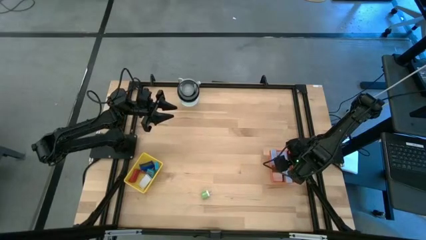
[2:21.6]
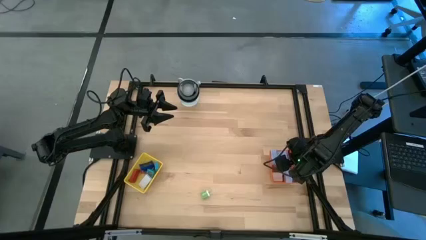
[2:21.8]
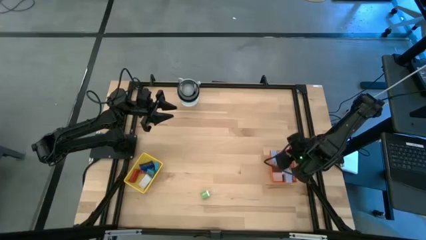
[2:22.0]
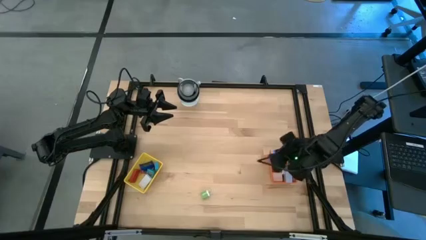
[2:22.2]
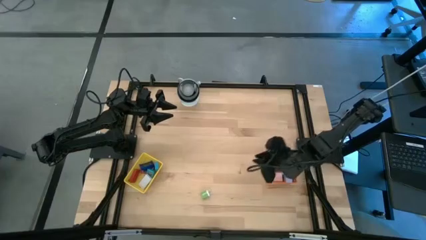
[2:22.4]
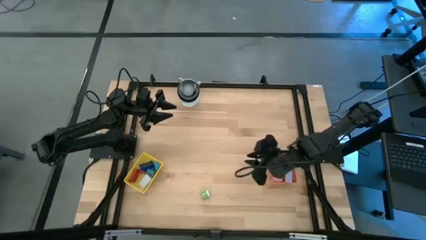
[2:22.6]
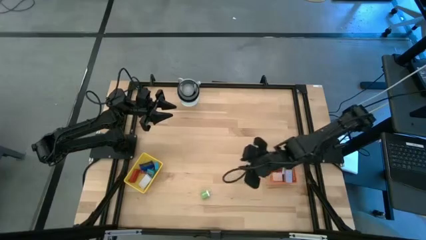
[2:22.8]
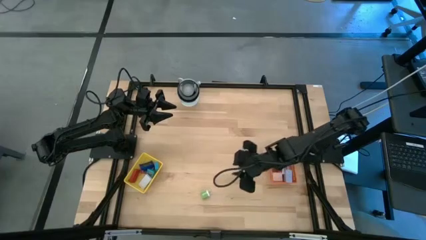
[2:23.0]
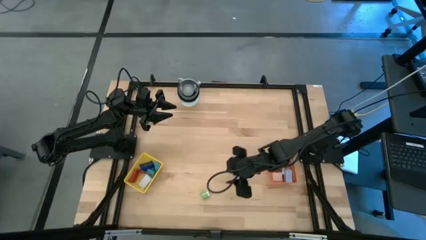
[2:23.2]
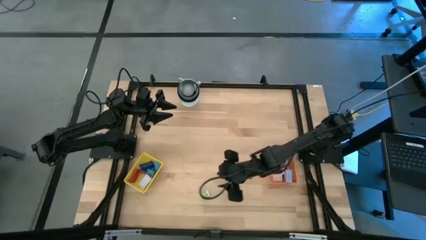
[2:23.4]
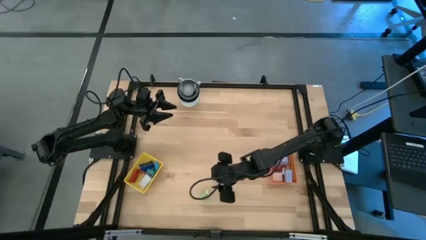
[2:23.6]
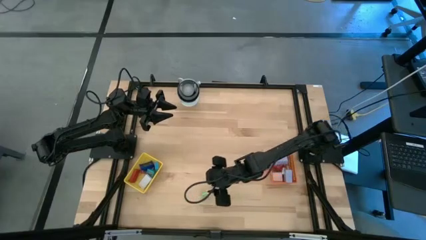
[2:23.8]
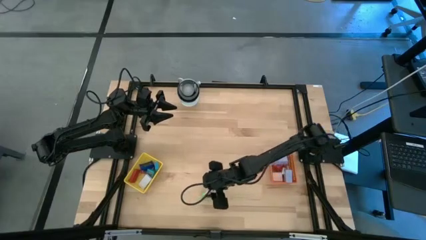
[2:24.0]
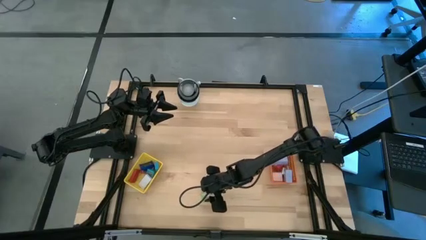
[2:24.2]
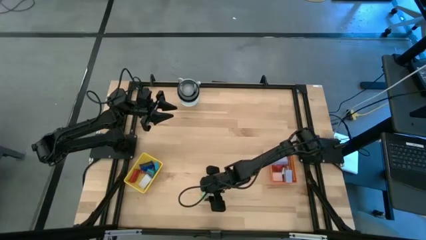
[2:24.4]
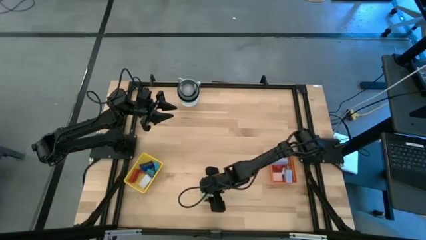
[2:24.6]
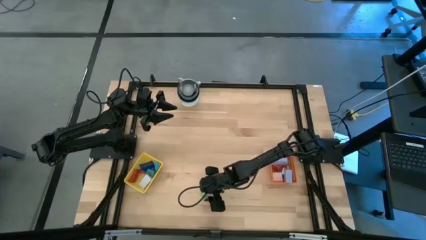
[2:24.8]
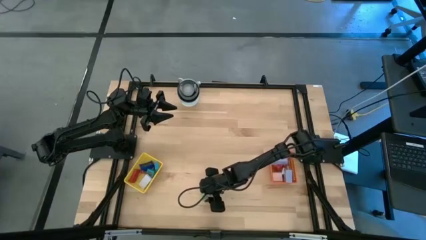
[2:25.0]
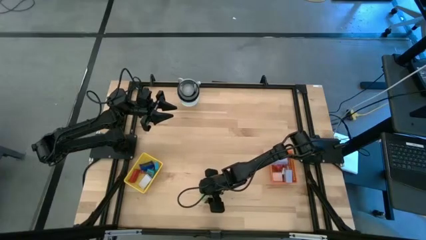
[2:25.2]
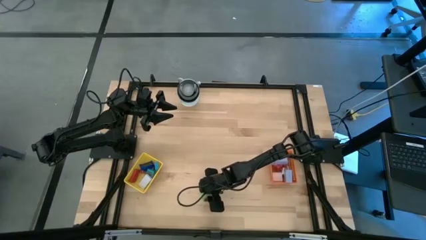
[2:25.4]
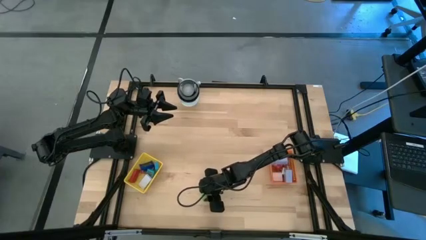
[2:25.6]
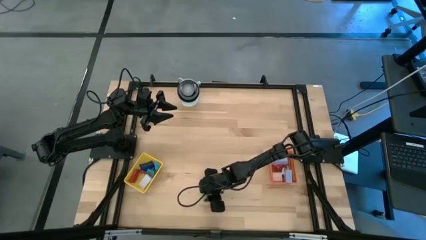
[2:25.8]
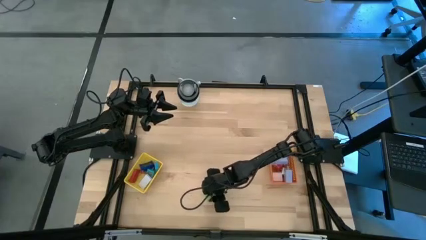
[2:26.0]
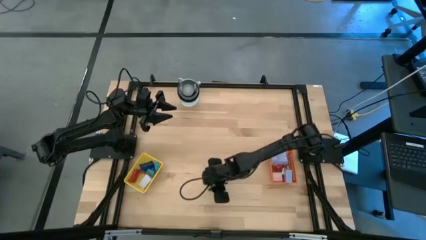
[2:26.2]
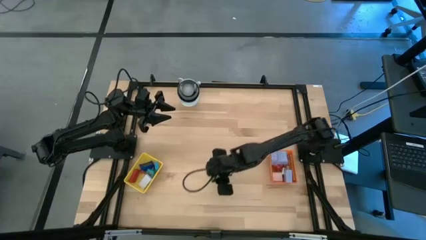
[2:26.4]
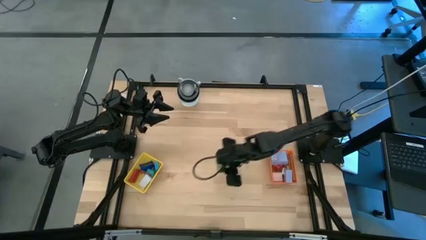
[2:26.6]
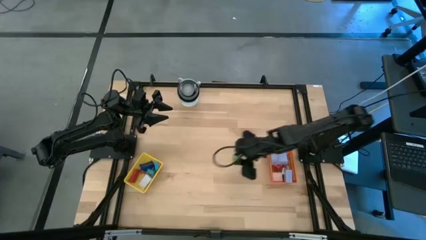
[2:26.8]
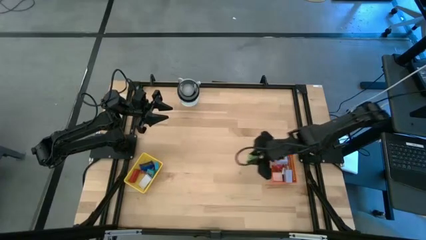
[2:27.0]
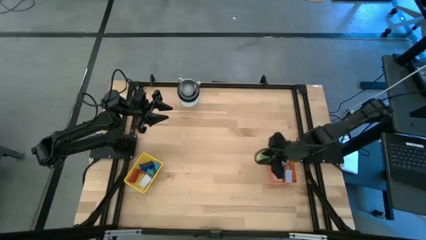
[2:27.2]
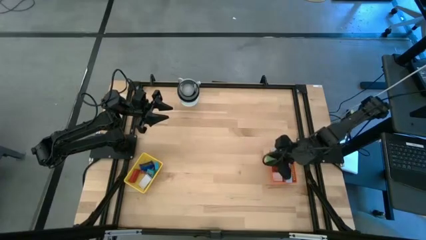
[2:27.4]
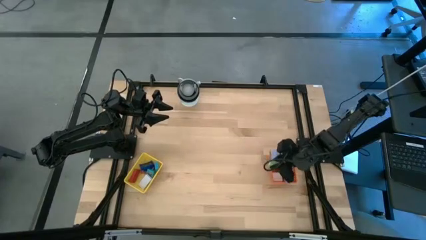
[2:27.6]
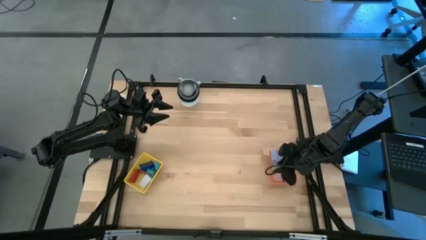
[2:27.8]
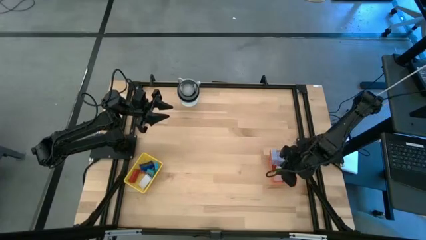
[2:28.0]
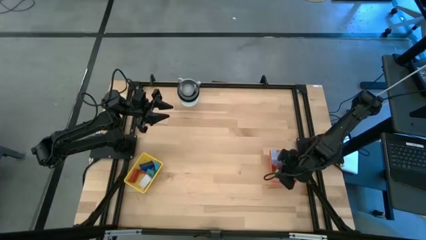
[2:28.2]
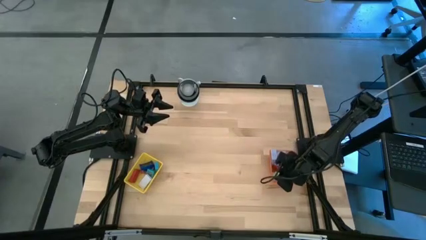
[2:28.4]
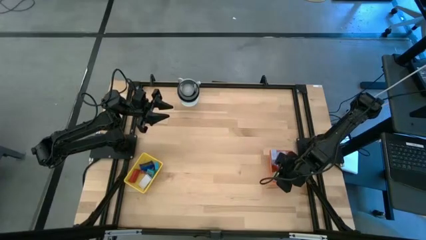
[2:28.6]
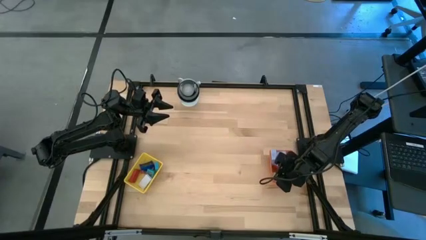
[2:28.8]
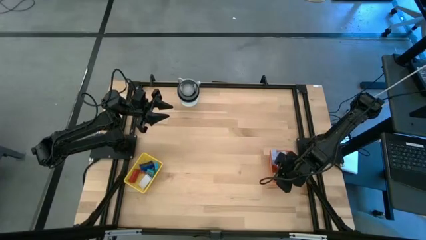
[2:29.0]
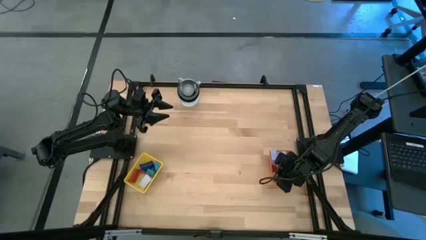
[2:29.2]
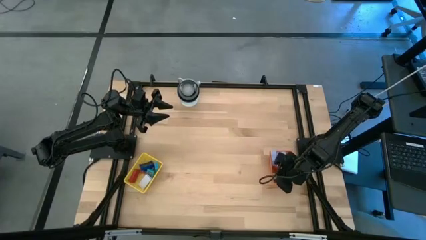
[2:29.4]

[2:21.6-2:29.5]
Task: Pick & Place Office items
Put the green charger adapter into the orange basket

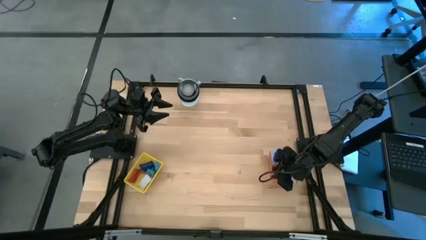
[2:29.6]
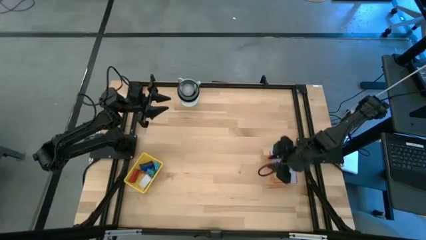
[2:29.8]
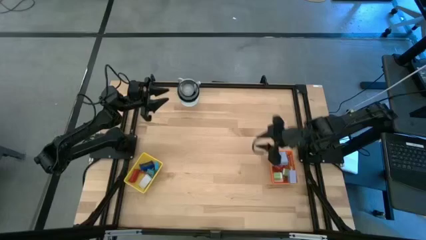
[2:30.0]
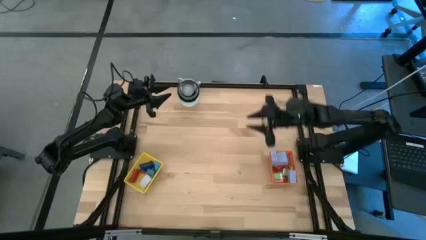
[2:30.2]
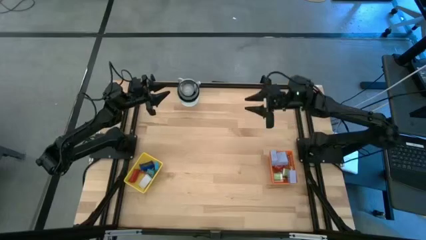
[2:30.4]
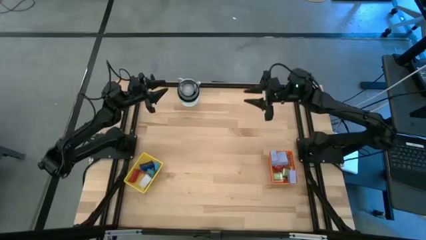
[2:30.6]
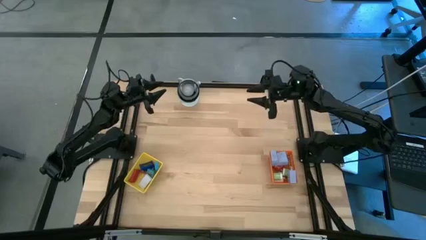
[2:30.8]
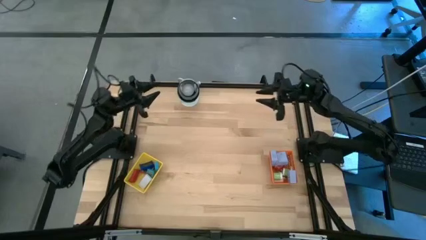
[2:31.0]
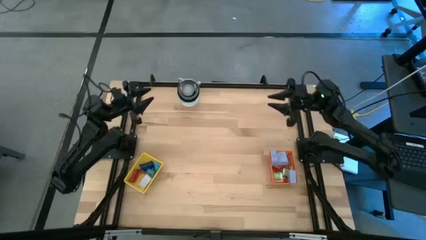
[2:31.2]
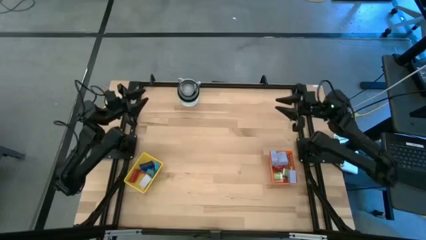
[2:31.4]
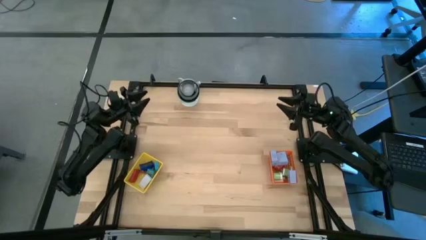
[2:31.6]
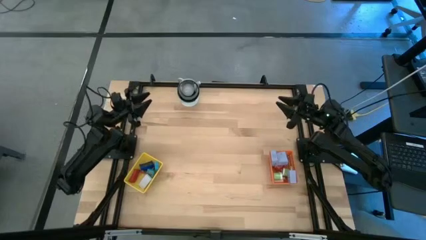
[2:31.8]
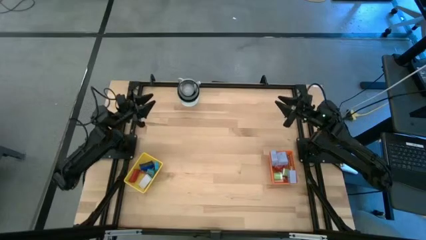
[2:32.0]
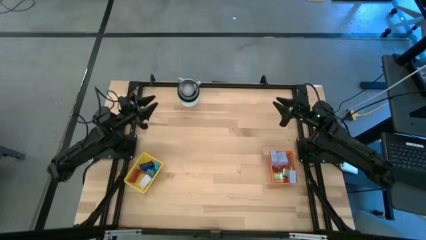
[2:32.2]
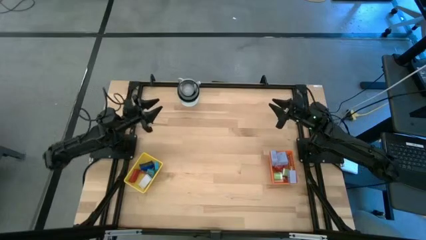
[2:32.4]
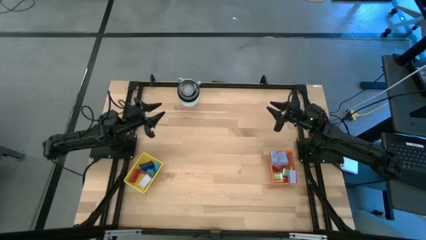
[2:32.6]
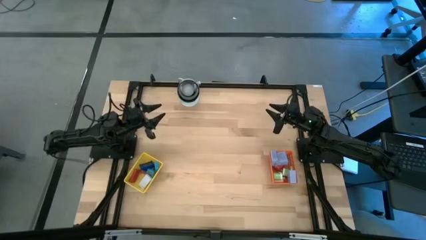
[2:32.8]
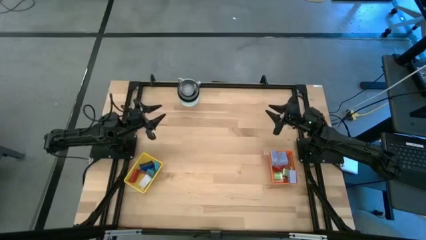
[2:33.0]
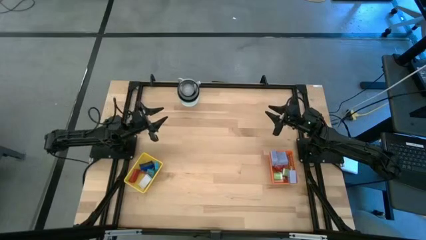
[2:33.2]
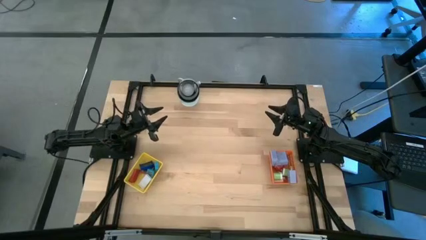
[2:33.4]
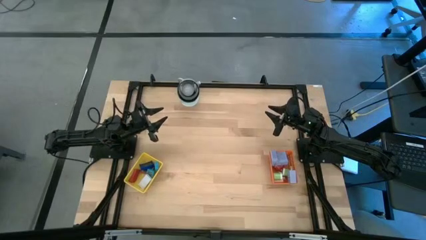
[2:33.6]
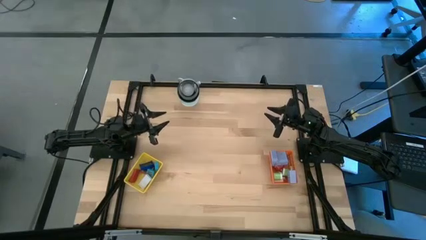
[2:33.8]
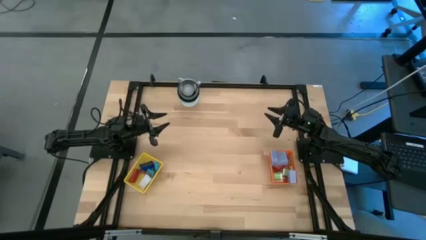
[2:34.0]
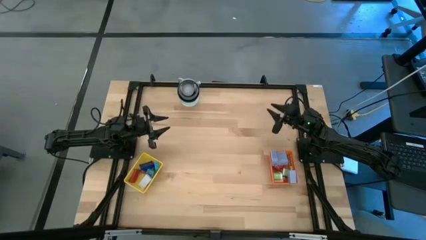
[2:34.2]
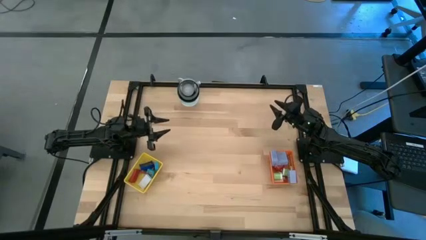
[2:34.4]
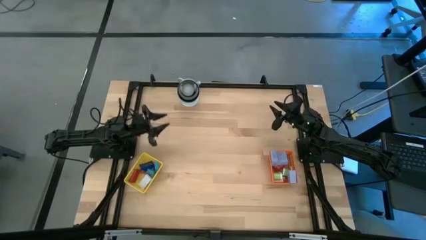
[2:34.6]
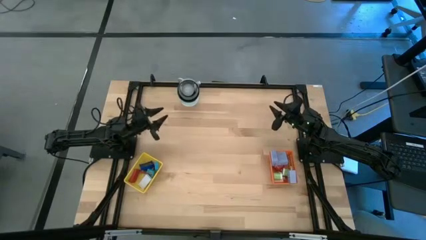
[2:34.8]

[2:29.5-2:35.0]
Return to Home Position

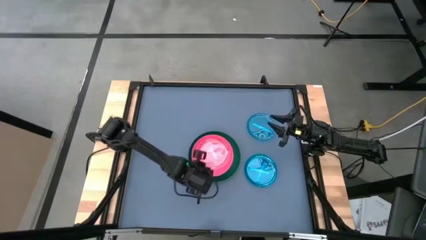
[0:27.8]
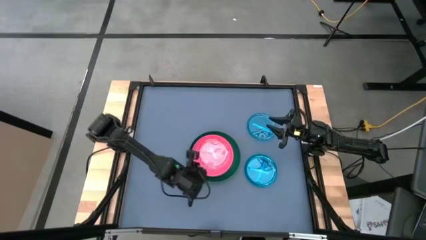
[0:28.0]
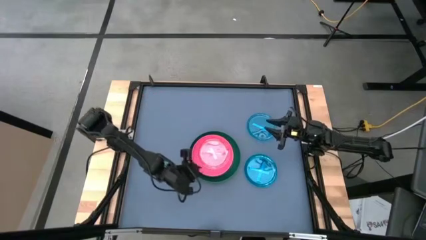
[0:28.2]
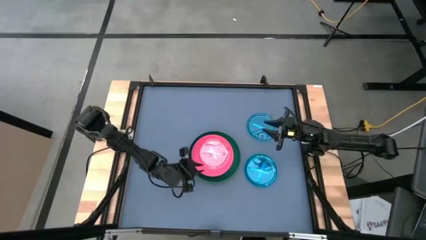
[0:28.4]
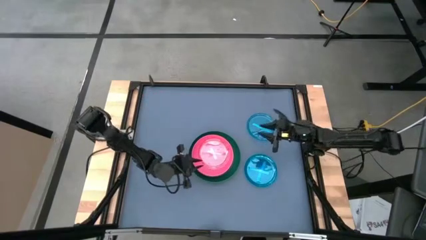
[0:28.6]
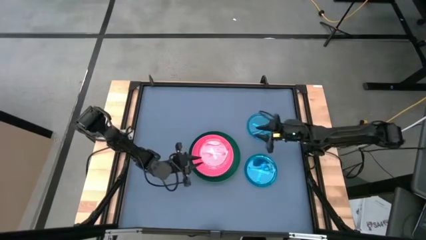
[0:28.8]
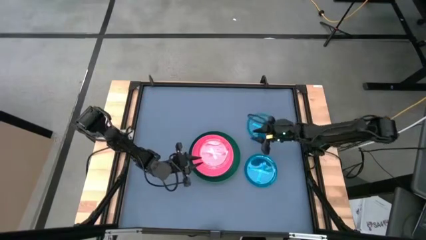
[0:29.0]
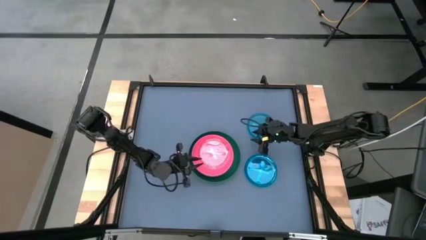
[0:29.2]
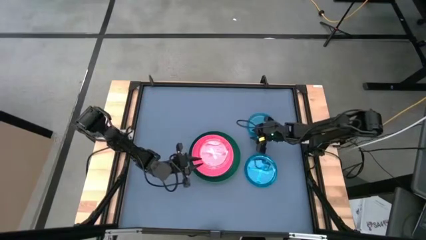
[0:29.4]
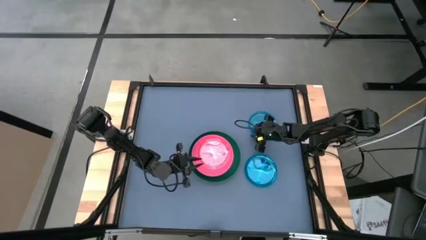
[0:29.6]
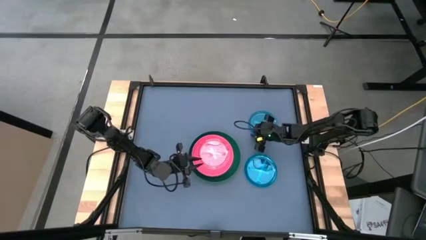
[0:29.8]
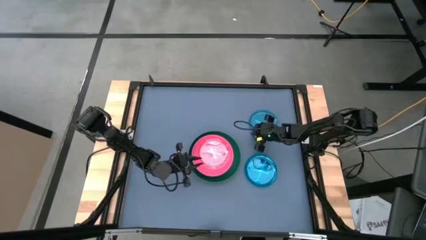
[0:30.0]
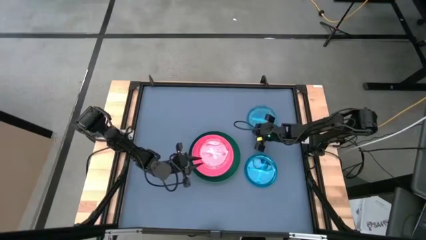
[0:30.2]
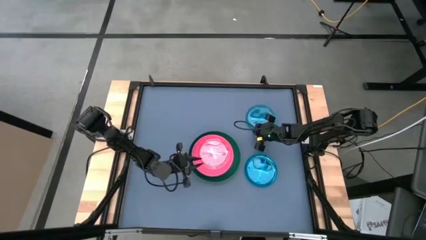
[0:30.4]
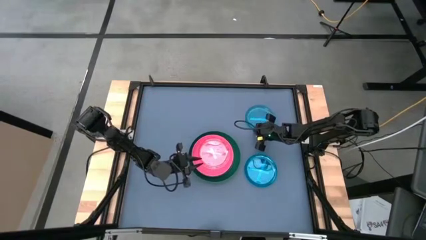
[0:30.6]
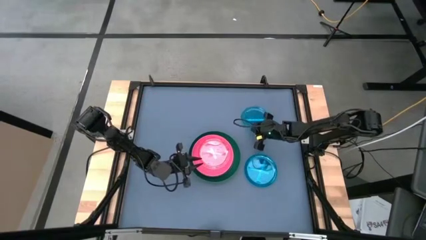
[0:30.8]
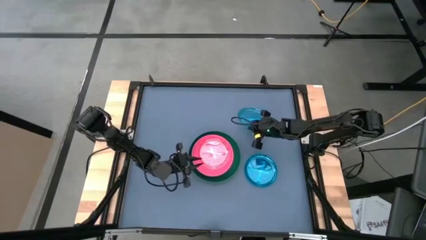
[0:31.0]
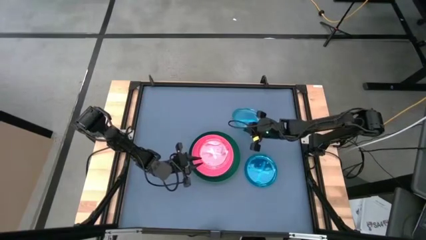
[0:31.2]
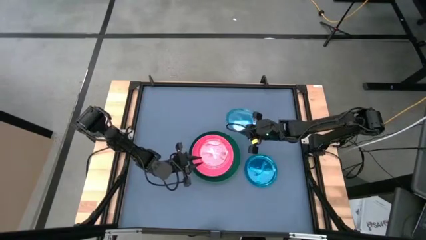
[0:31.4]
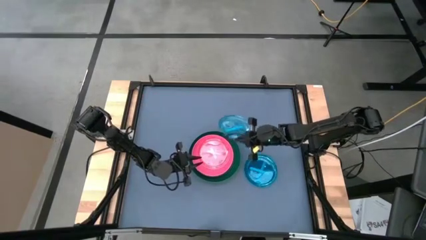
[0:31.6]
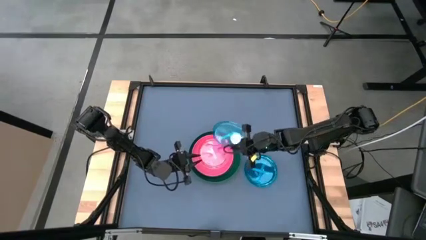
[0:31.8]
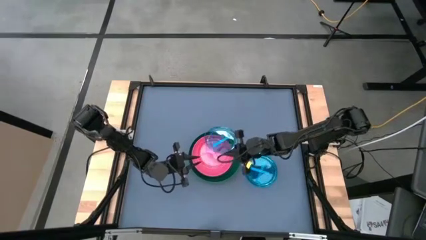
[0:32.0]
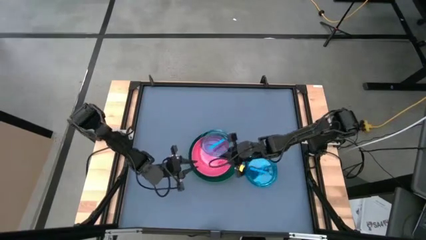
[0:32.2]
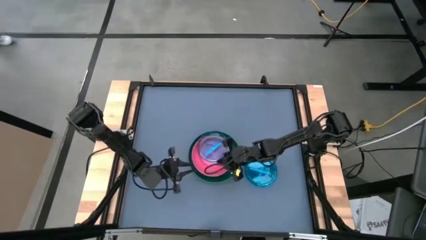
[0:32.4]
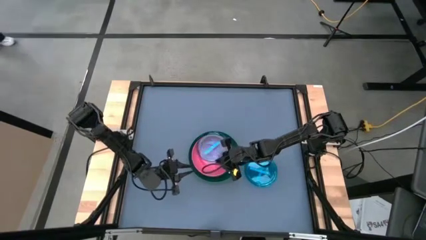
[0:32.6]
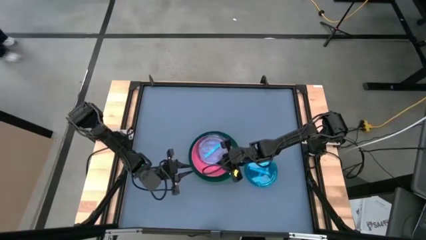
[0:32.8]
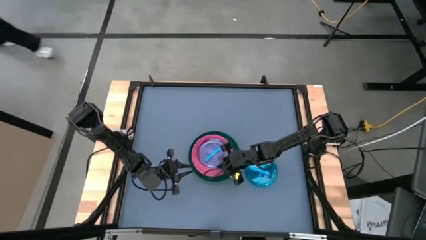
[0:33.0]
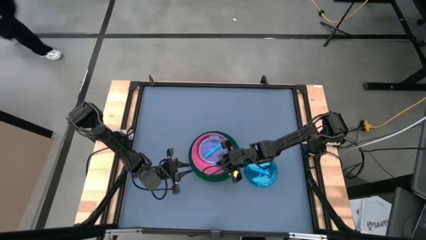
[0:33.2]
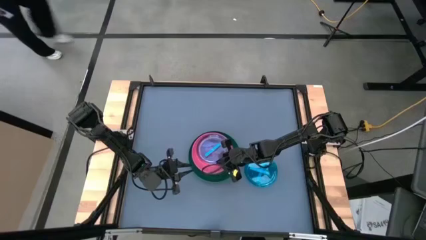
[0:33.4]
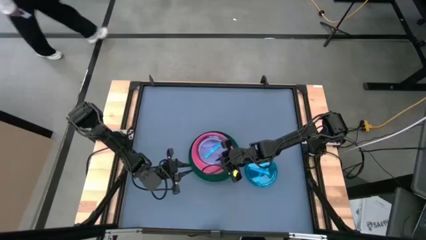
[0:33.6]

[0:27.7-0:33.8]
Task: Stack plastic plates
Stack the top transparent blue plate on top of the transparent pink plate
